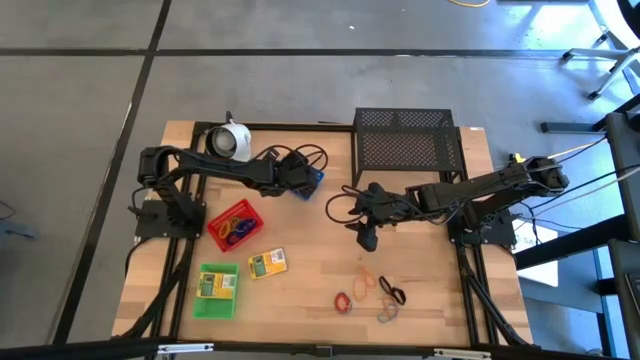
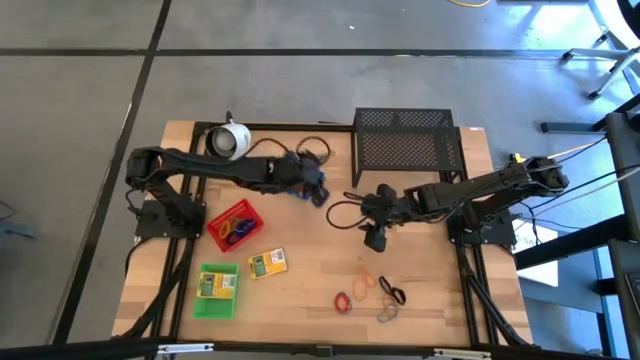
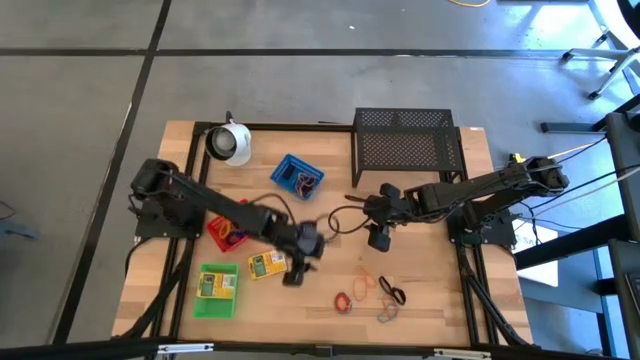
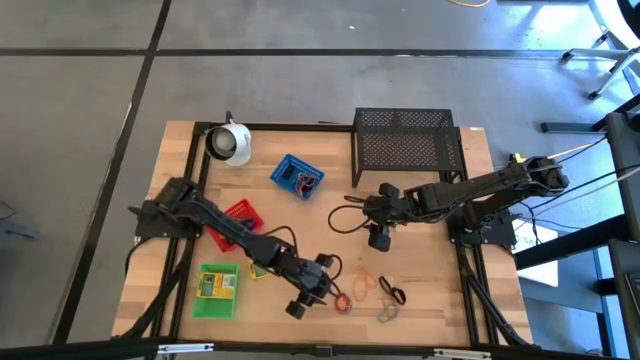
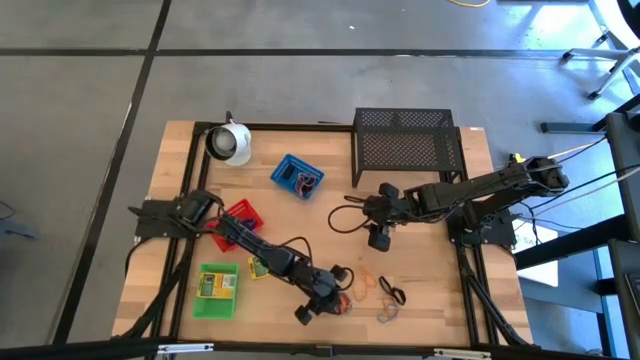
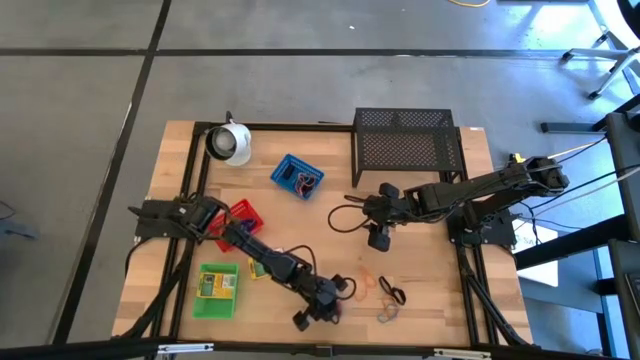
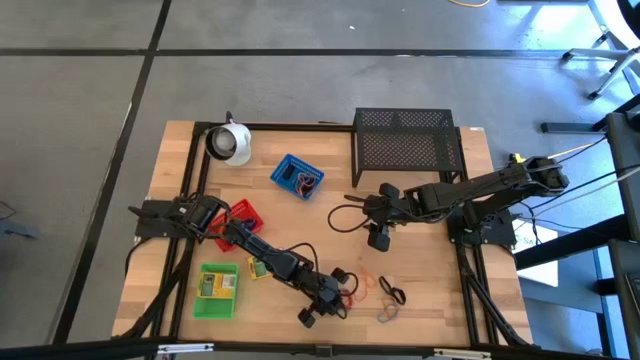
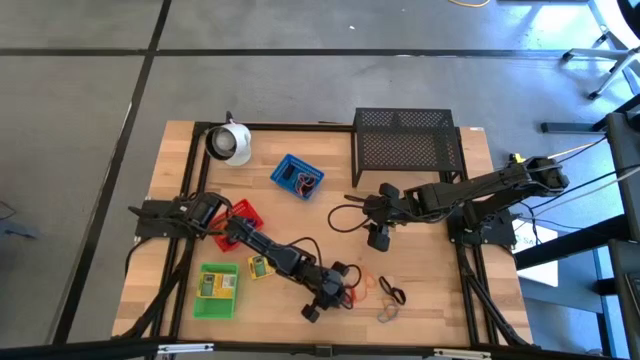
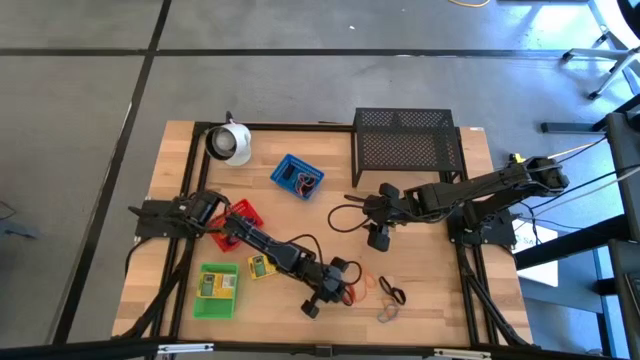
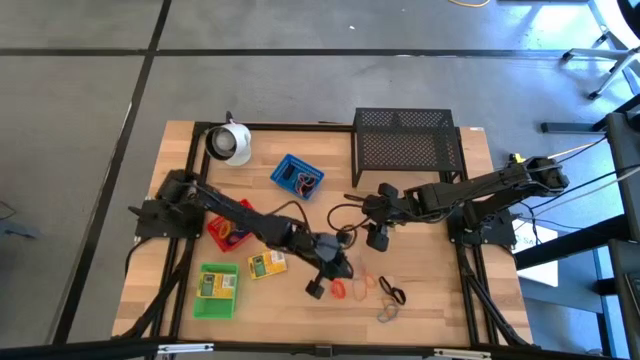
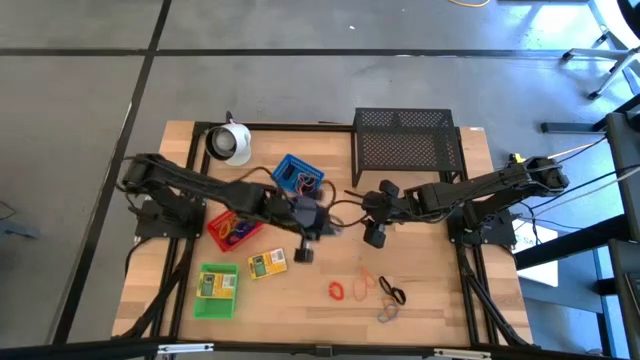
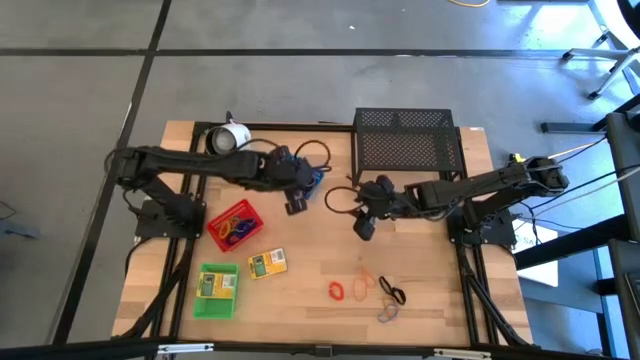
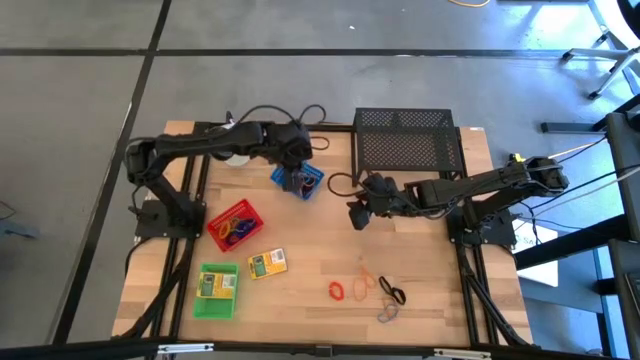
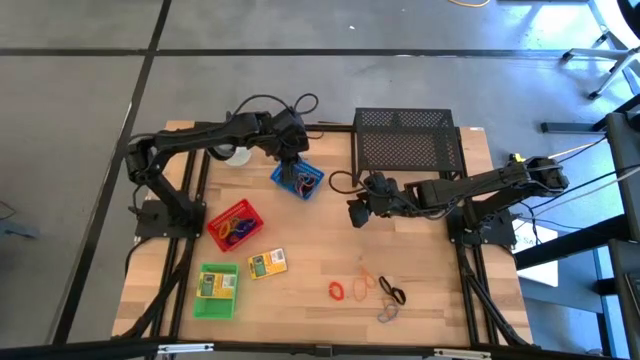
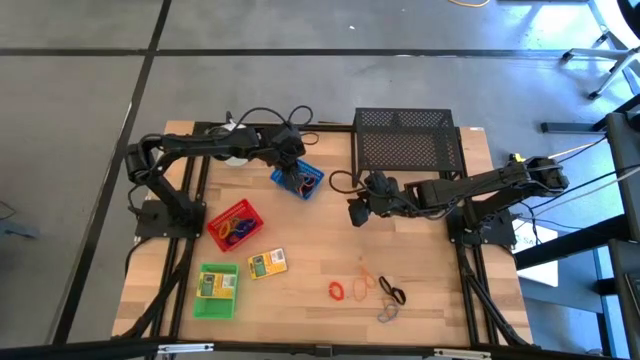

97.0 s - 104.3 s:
Task: Pick & Place Office Desk Supplies
Put the blue rubber band into the blue bin

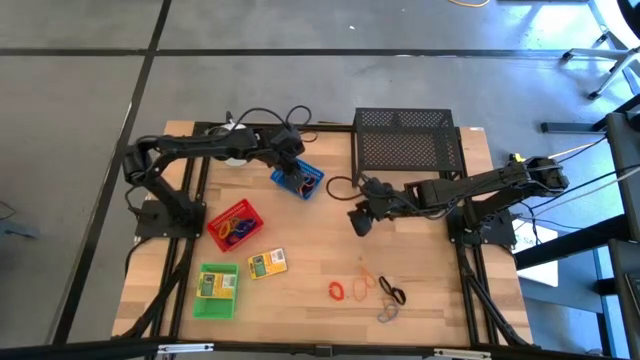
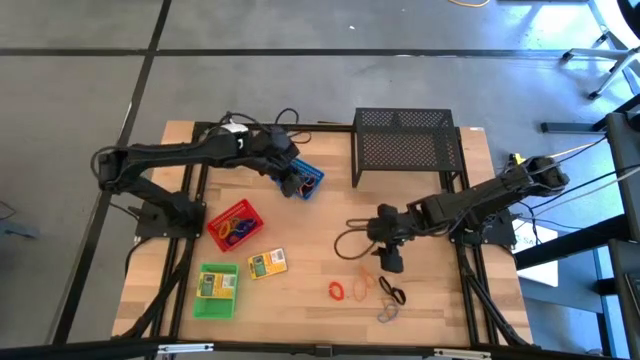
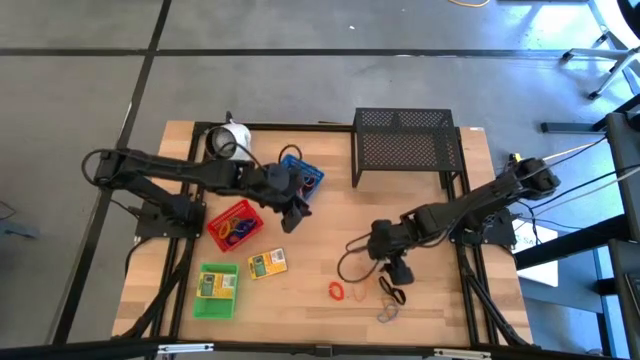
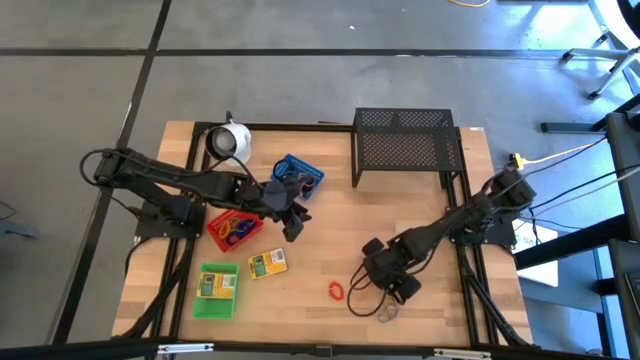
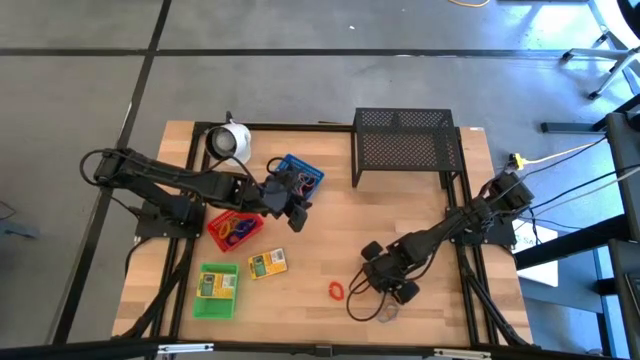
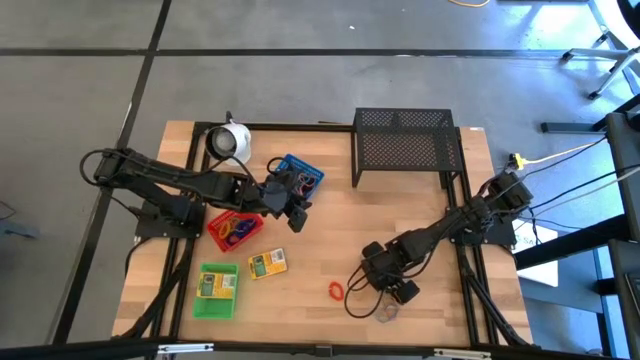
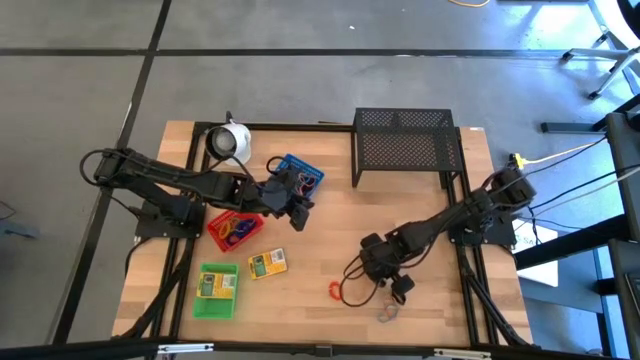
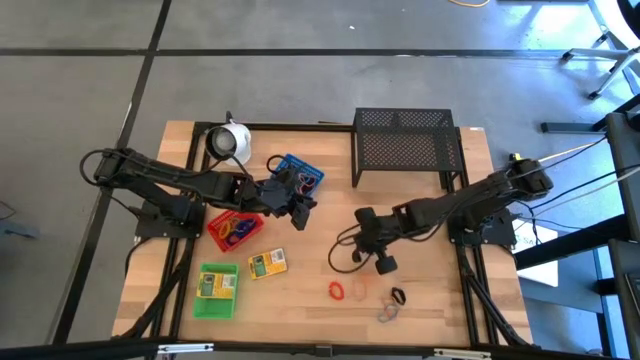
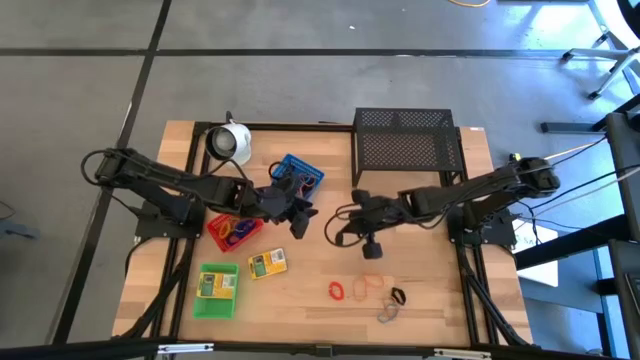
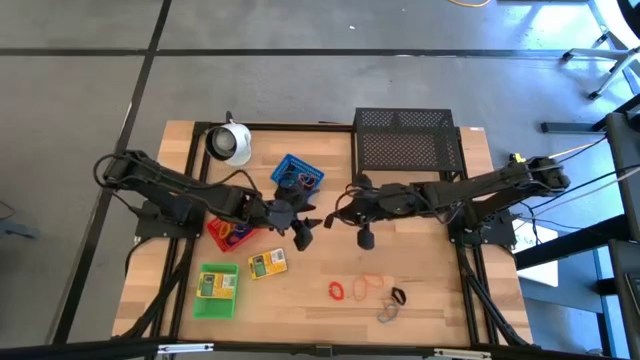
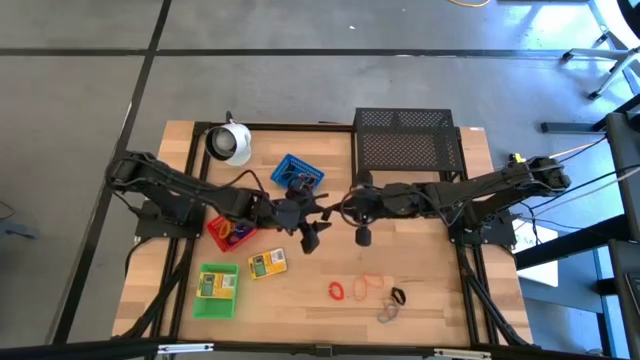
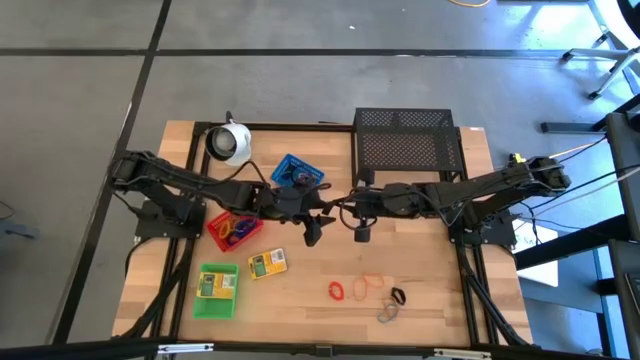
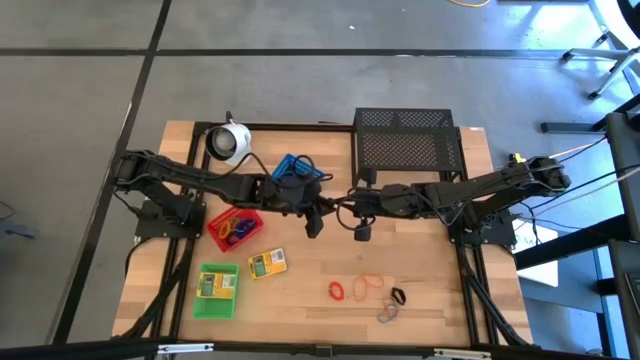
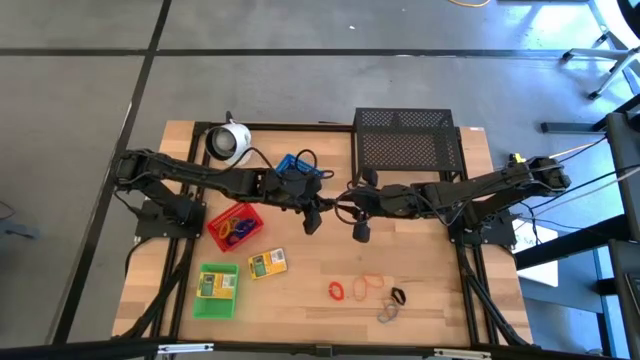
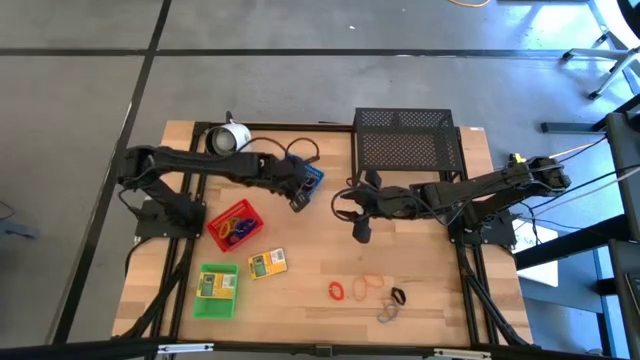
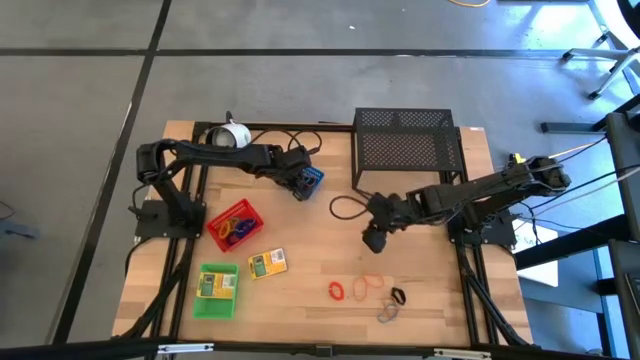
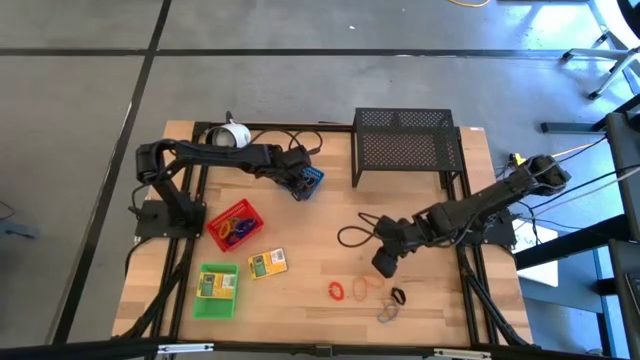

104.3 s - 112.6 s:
Put the black rubber band into the blue bin

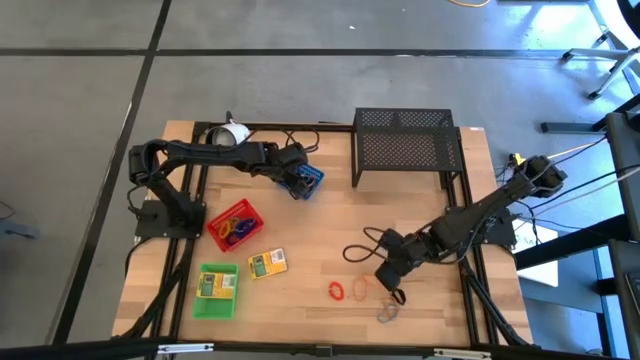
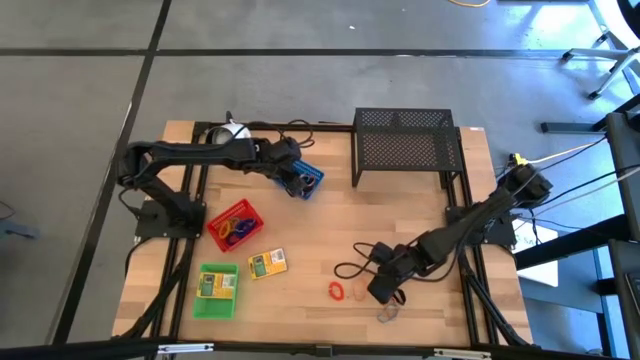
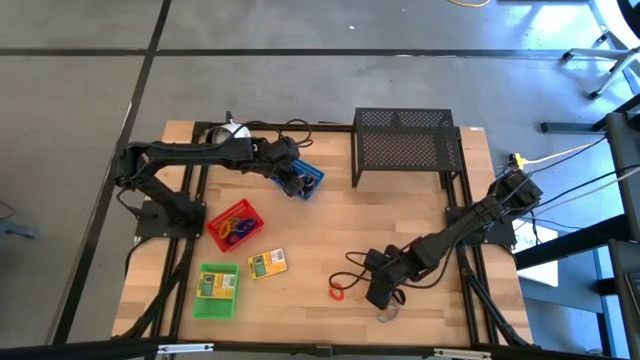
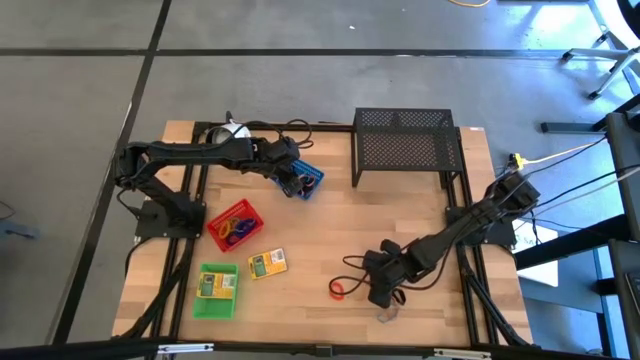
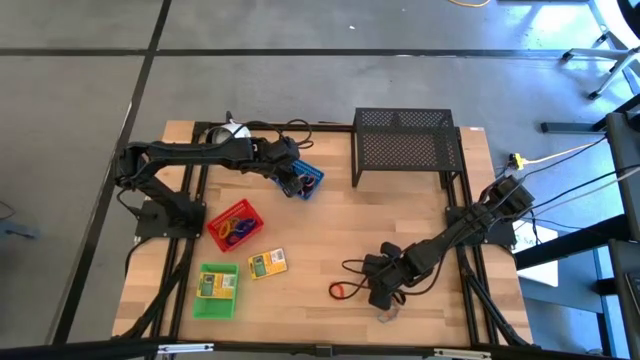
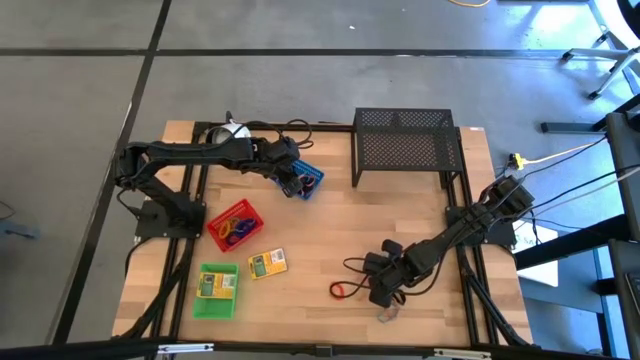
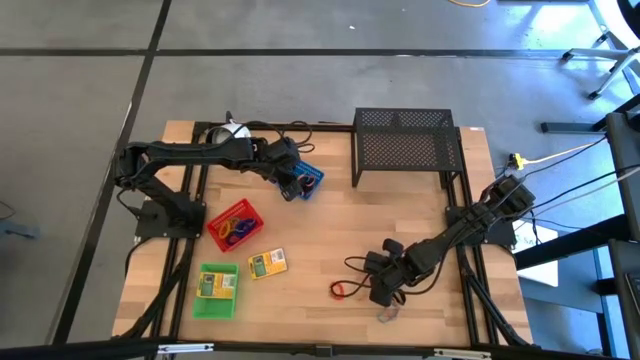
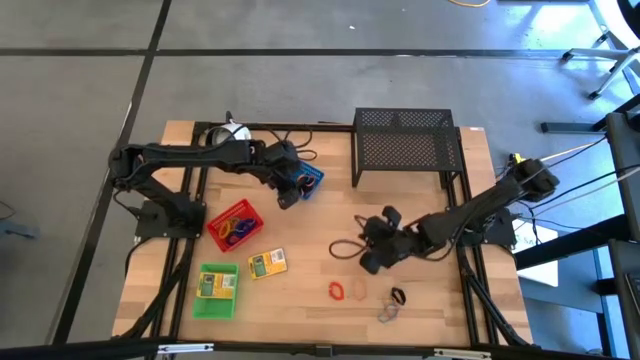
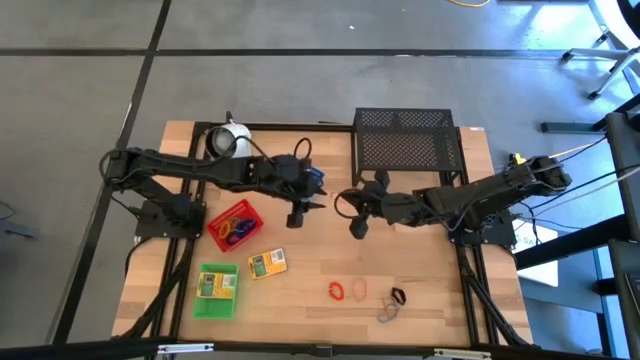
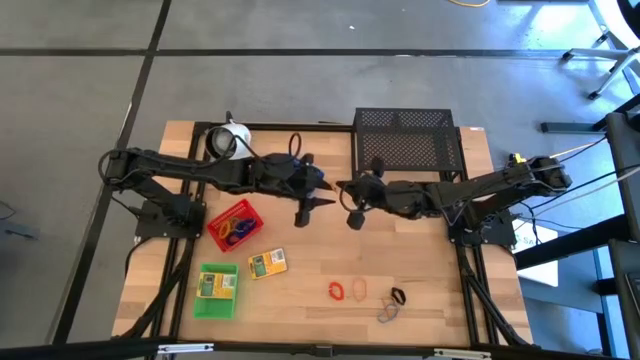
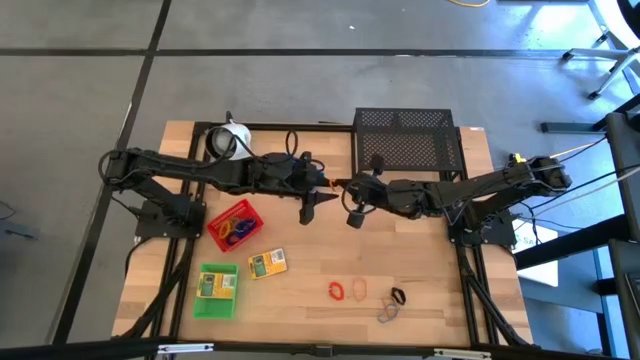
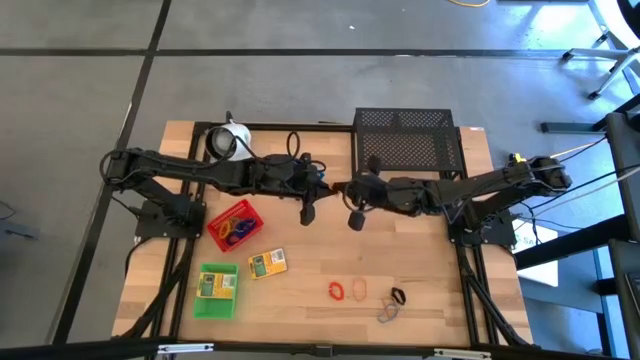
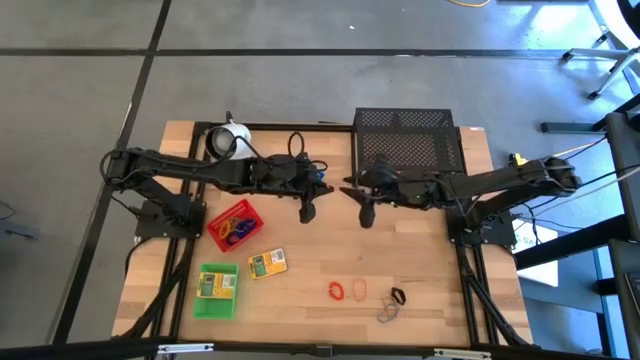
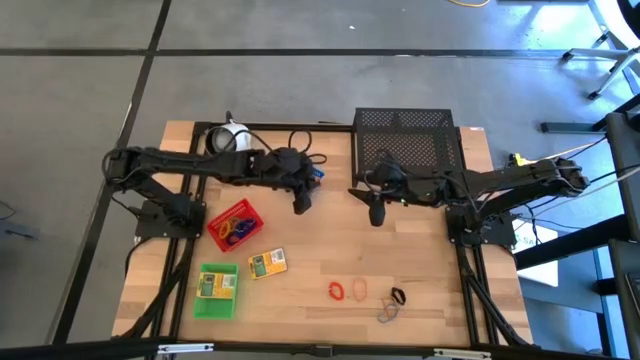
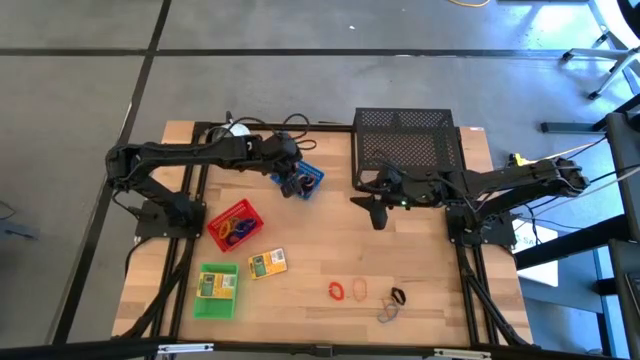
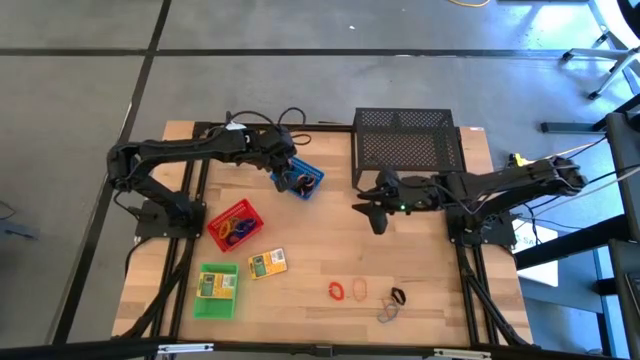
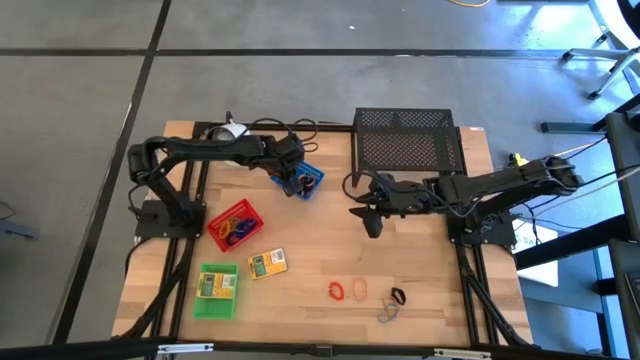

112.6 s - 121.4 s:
Put the orange rubber band into the blue bin
